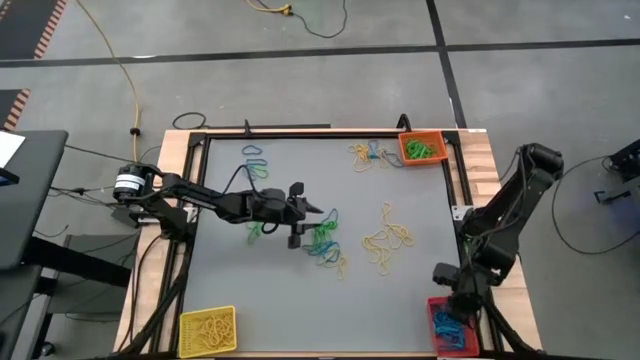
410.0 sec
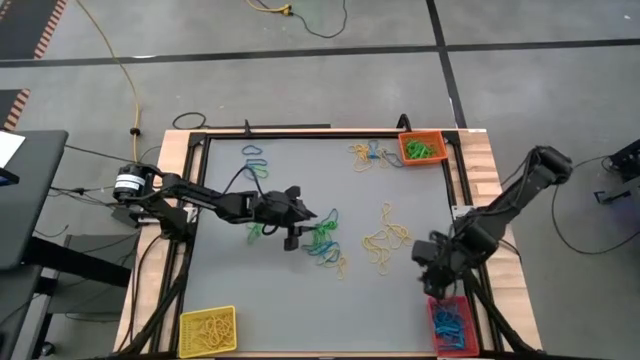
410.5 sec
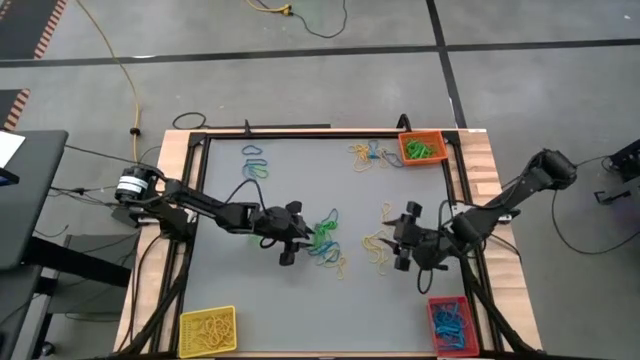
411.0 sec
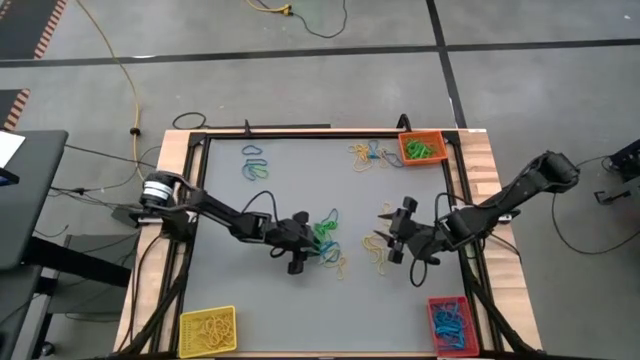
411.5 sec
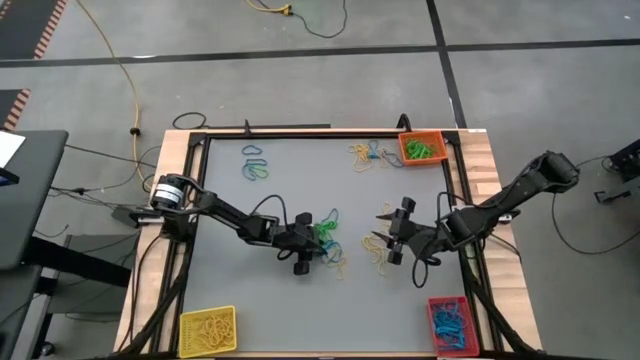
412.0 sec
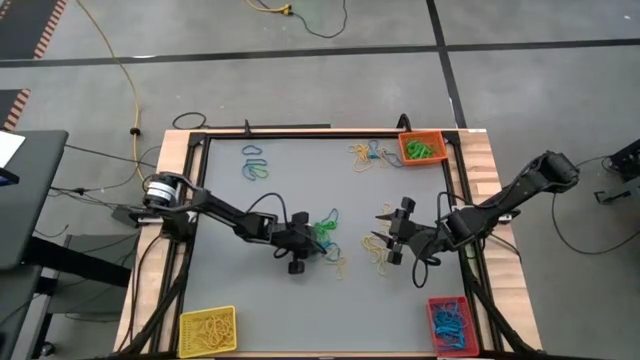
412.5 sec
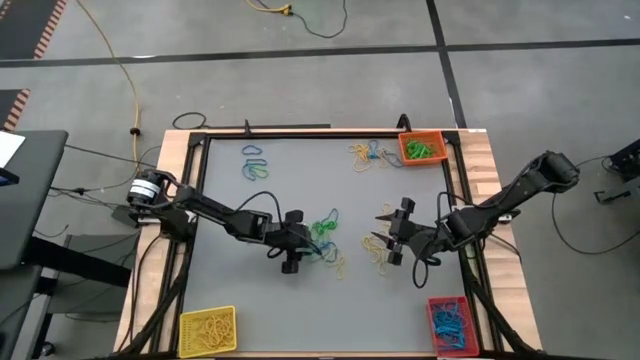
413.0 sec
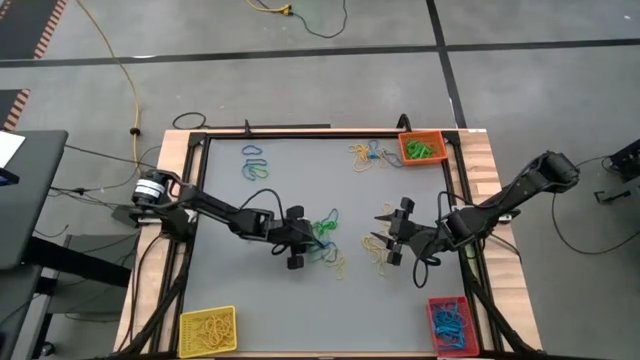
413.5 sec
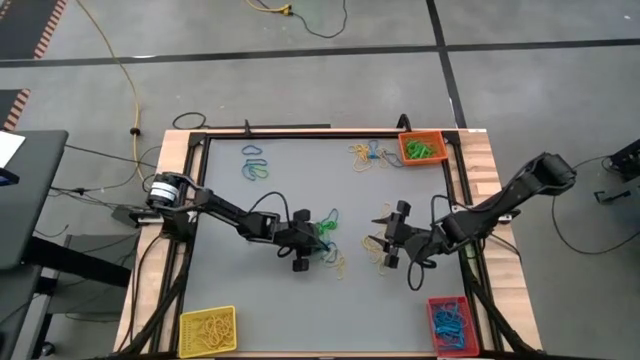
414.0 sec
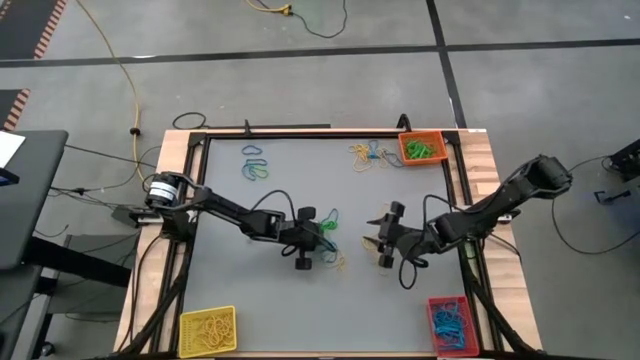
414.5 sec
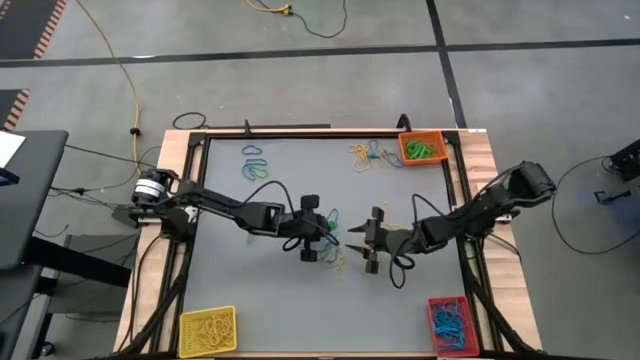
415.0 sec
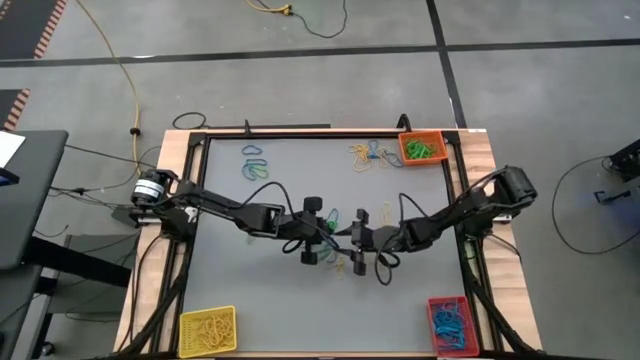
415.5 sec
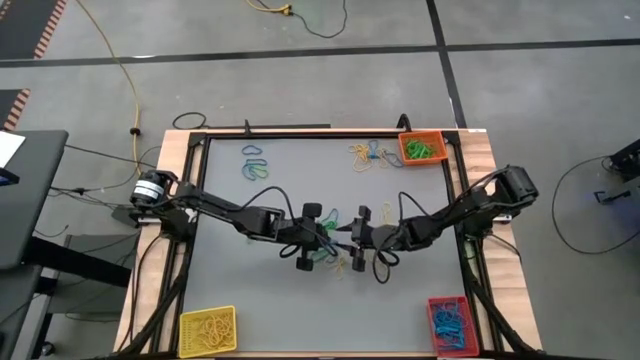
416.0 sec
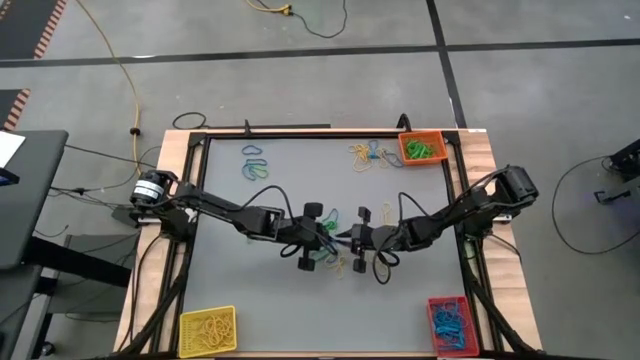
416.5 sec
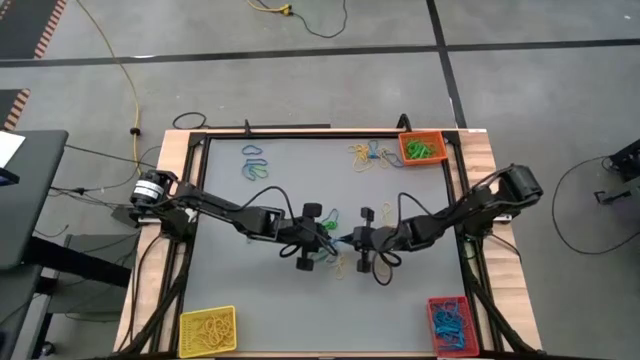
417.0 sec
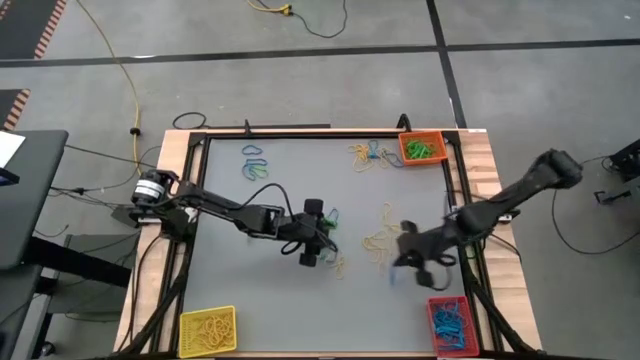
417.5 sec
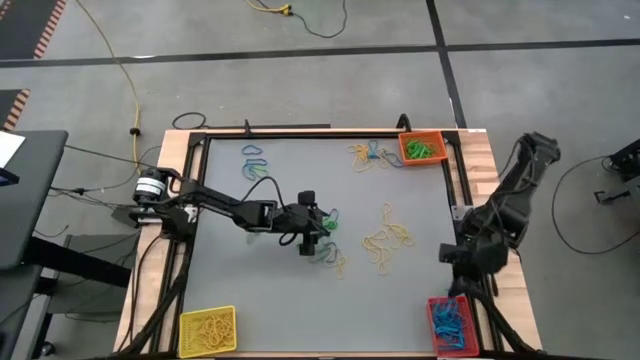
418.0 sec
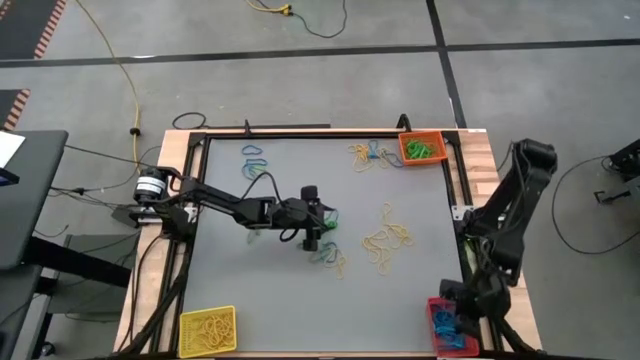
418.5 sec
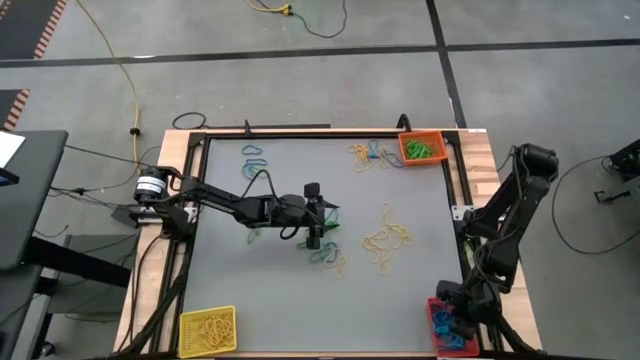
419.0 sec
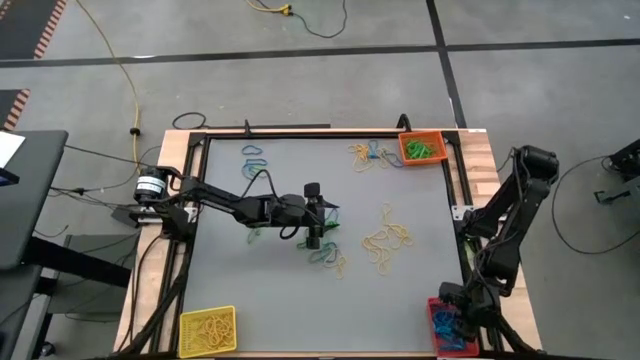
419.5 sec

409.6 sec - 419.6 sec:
Task: Sort rubber bands into baskets
Put the blue rubber band into the red bin

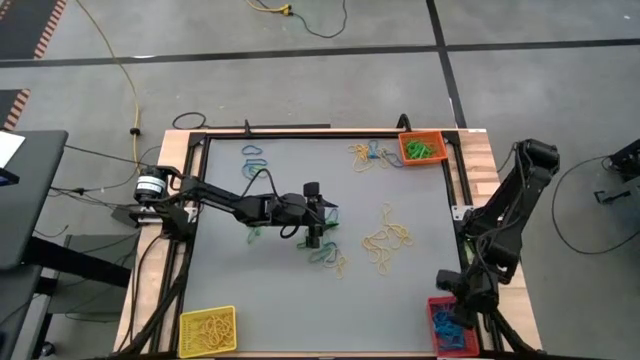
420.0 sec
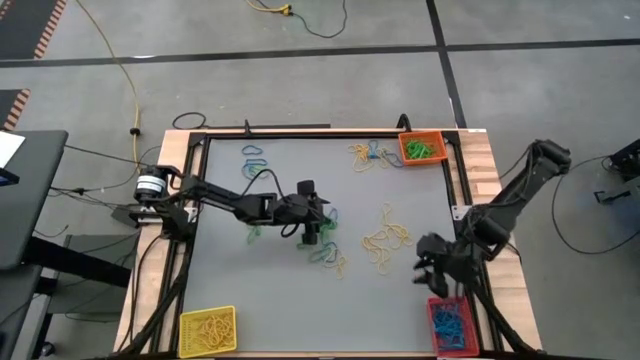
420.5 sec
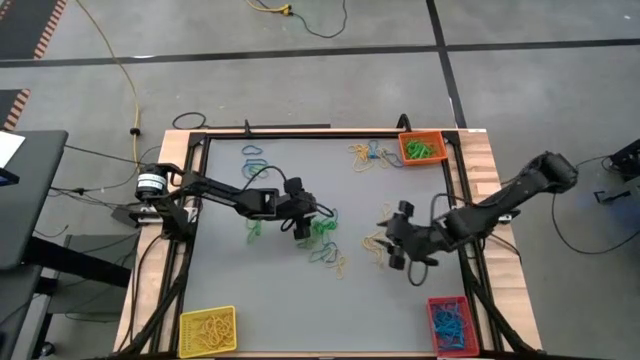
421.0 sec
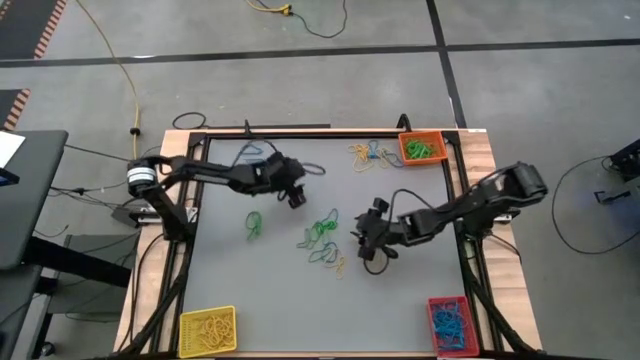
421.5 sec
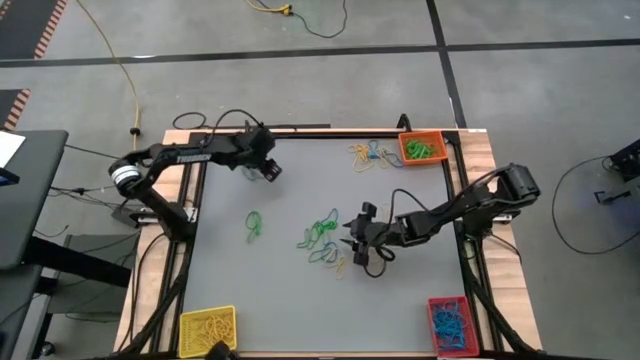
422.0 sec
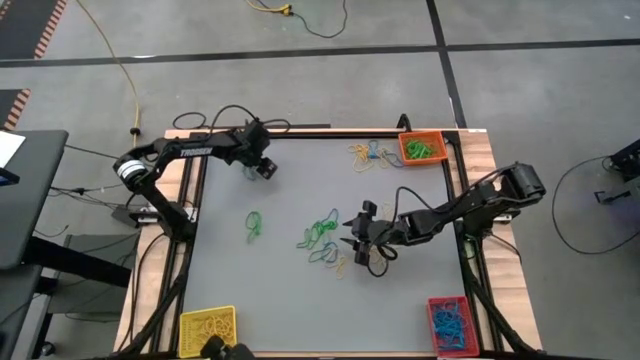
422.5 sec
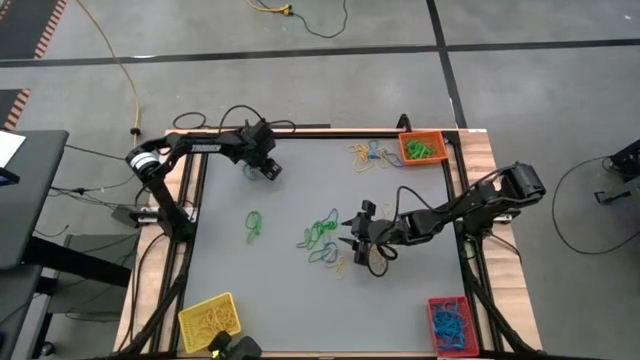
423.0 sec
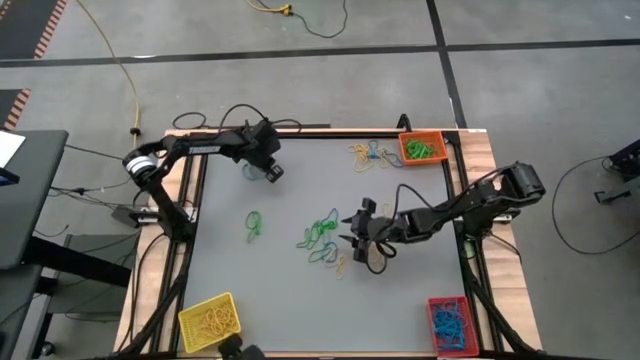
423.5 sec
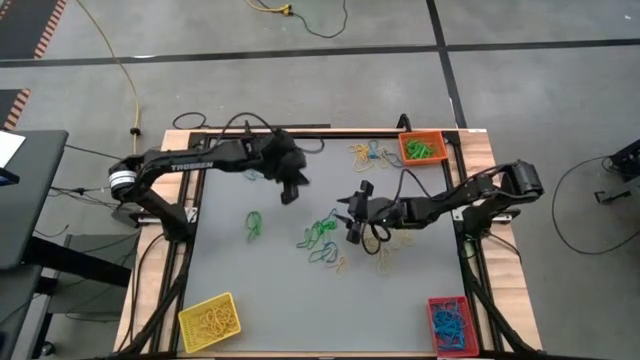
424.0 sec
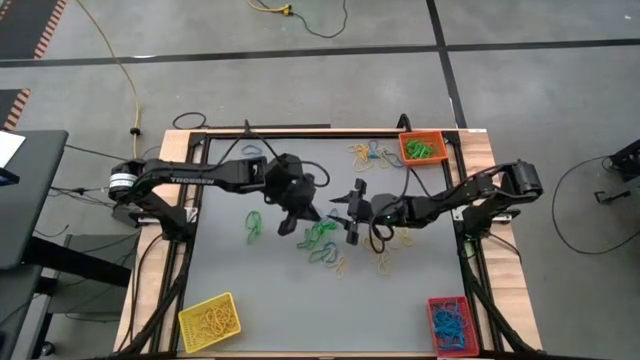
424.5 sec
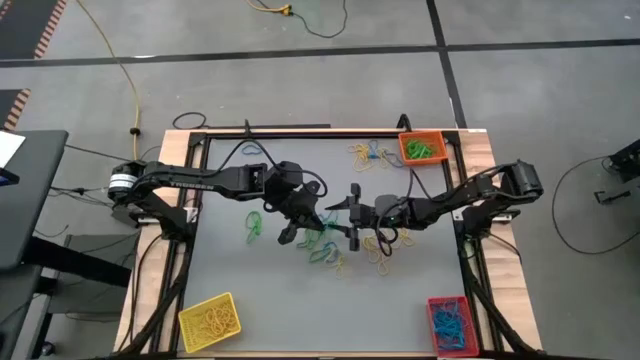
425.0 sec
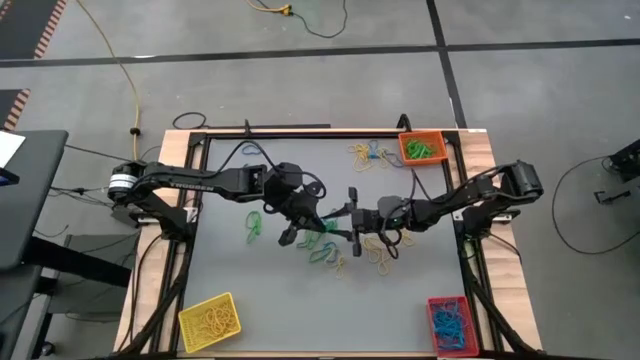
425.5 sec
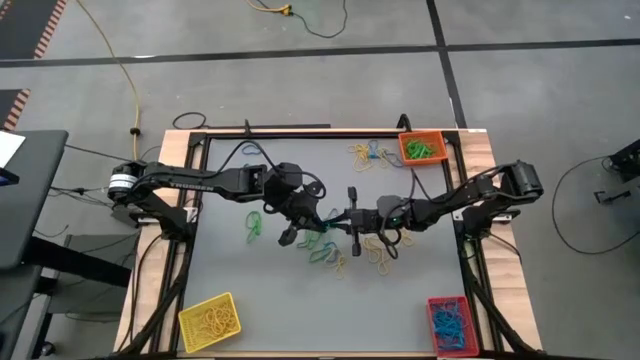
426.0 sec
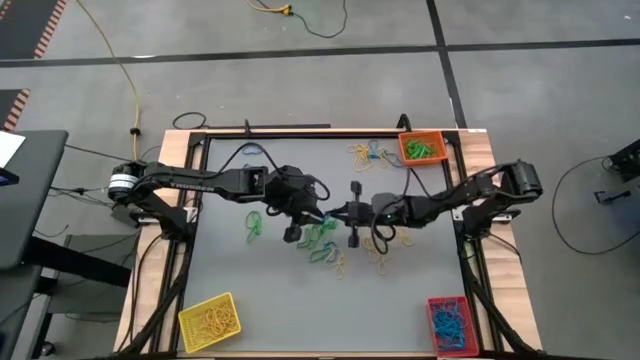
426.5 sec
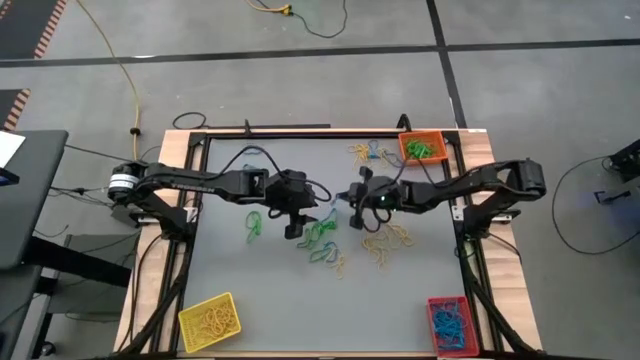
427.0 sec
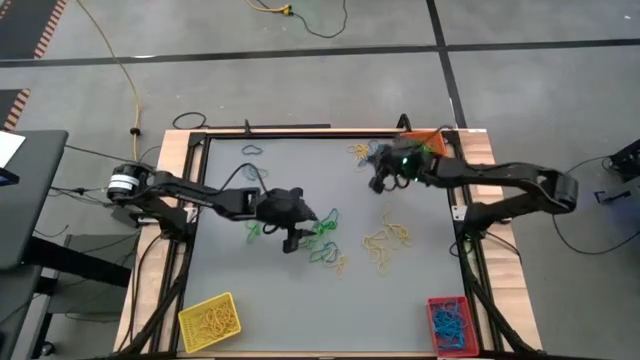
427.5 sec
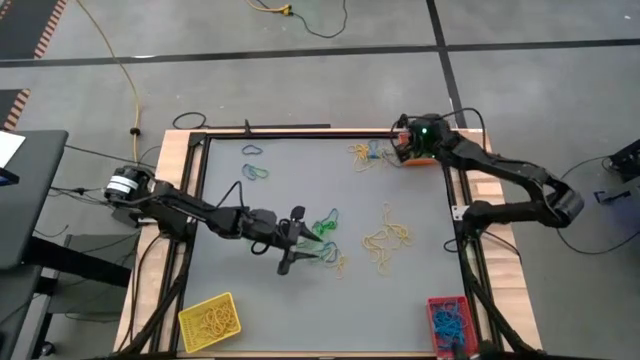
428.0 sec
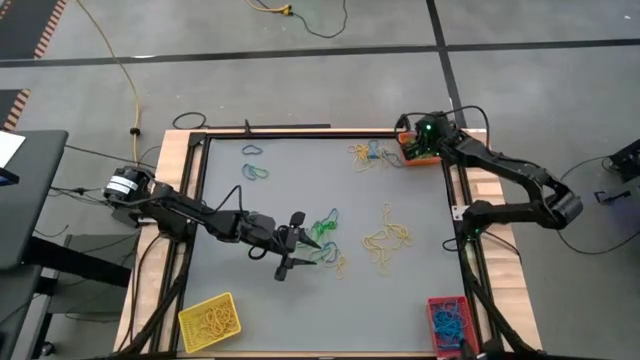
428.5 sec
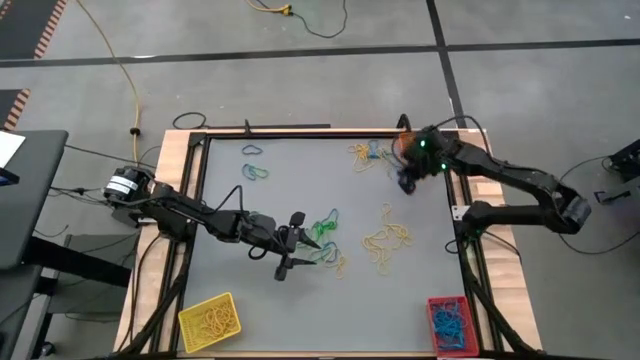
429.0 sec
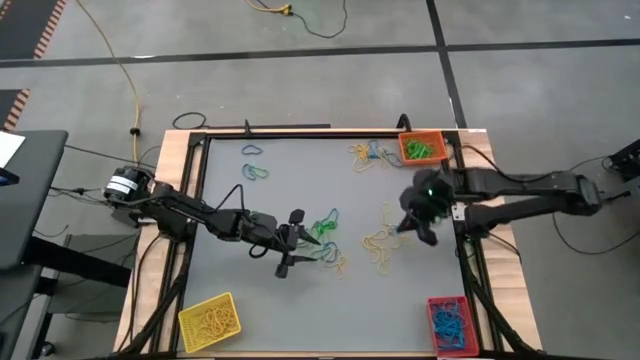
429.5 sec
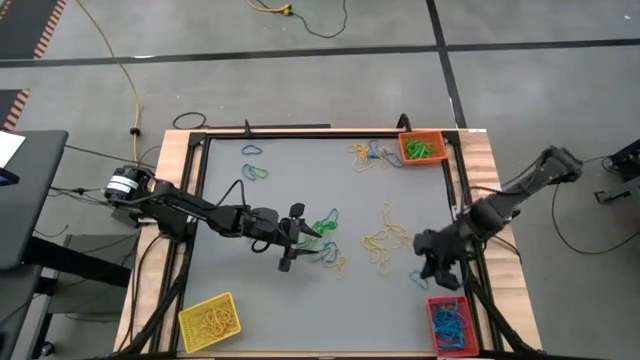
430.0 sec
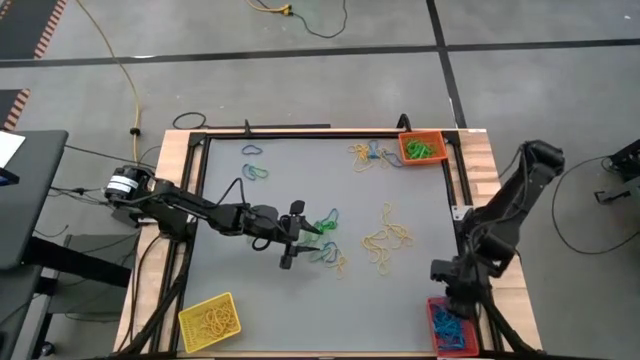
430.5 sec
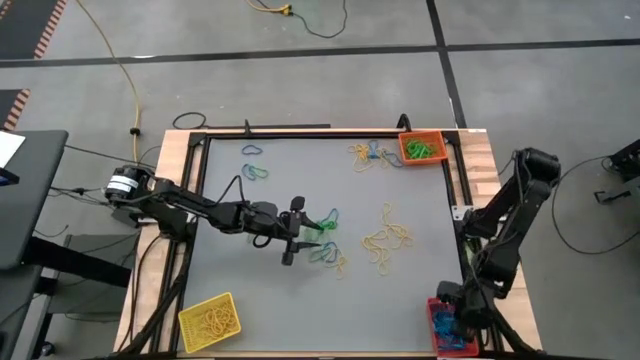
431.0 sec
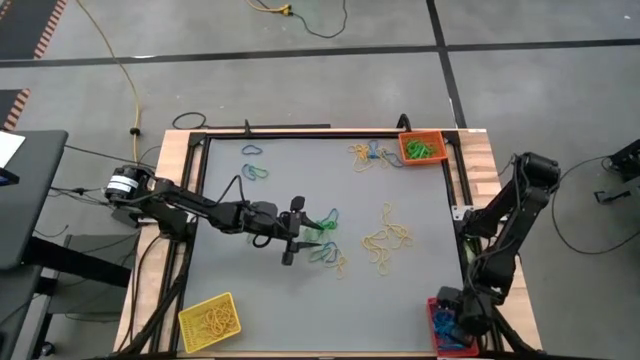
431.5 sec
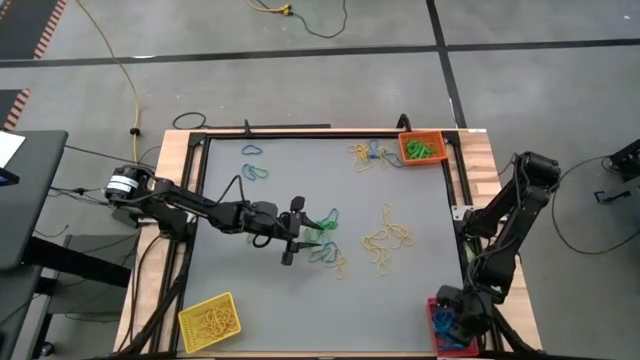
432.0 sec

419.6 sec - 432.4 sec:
Put the blue rubber band into the red bin
